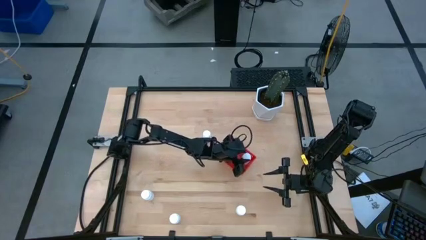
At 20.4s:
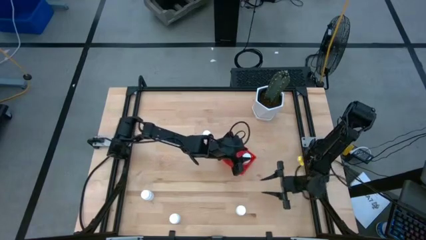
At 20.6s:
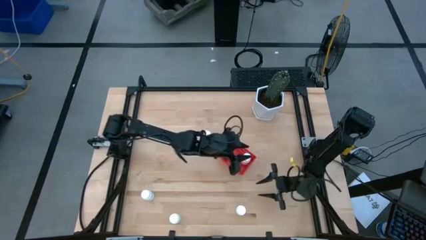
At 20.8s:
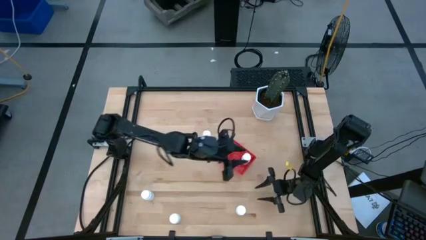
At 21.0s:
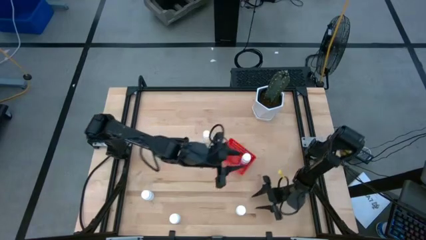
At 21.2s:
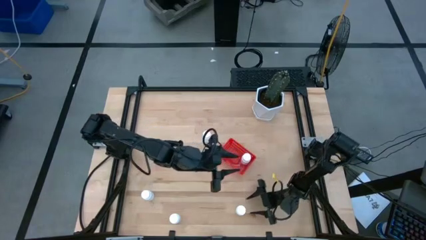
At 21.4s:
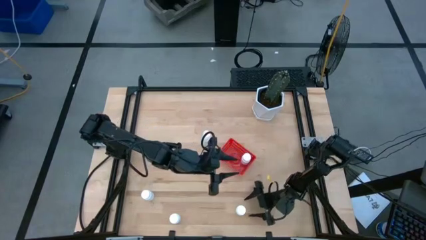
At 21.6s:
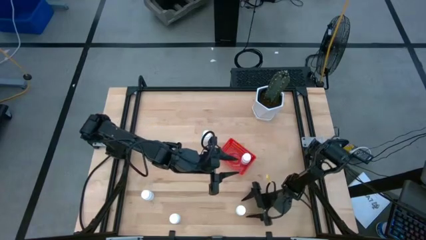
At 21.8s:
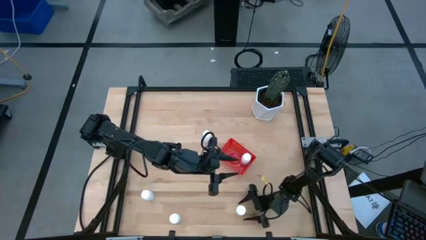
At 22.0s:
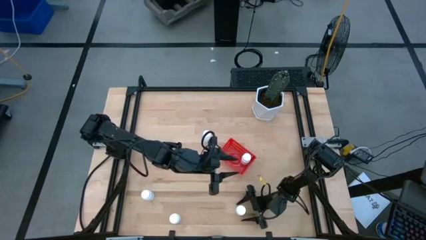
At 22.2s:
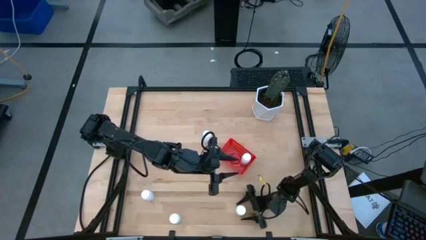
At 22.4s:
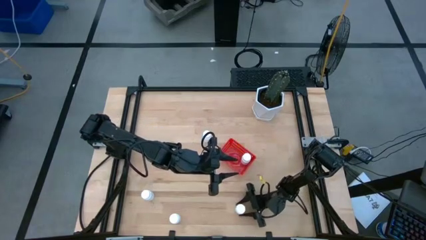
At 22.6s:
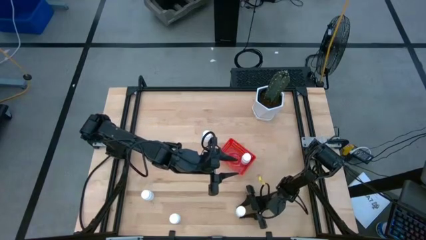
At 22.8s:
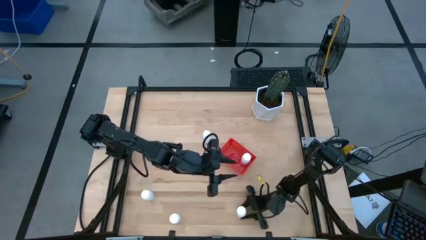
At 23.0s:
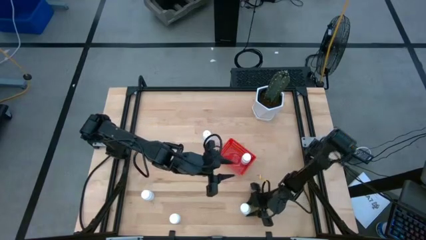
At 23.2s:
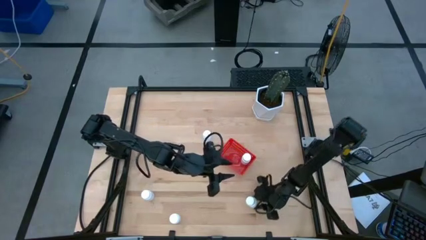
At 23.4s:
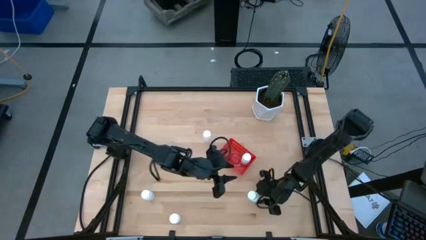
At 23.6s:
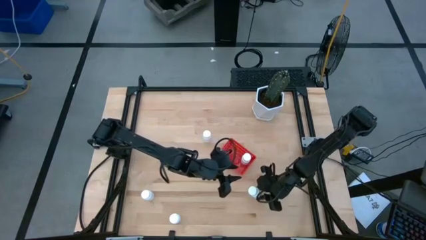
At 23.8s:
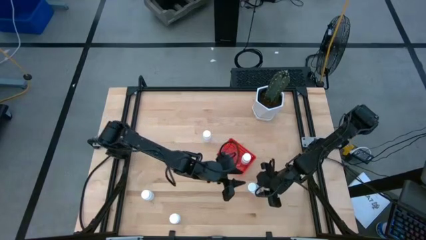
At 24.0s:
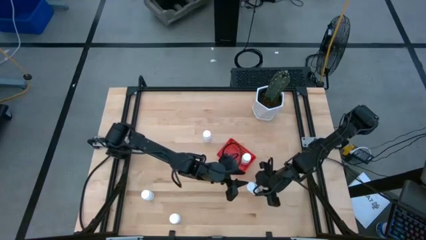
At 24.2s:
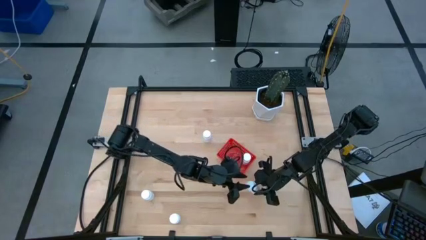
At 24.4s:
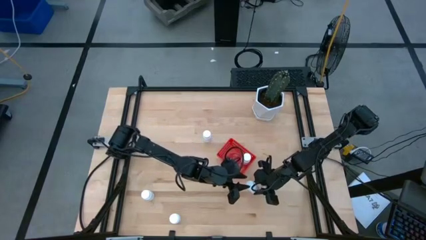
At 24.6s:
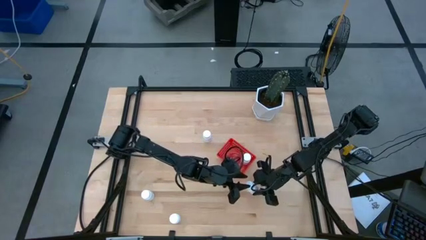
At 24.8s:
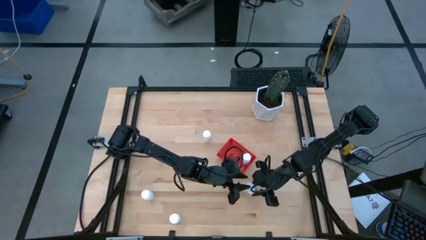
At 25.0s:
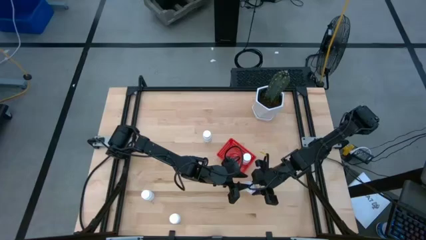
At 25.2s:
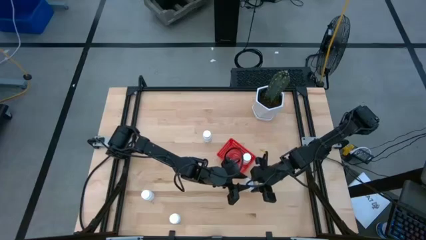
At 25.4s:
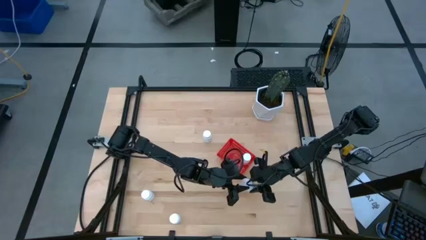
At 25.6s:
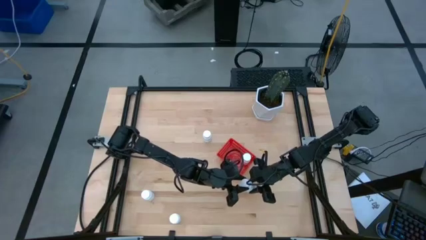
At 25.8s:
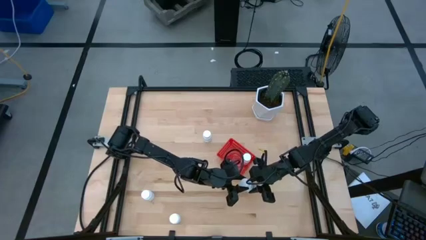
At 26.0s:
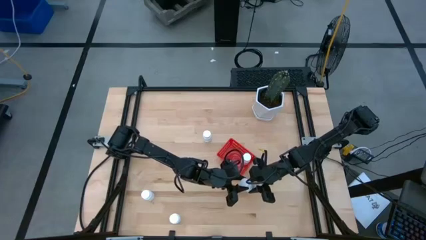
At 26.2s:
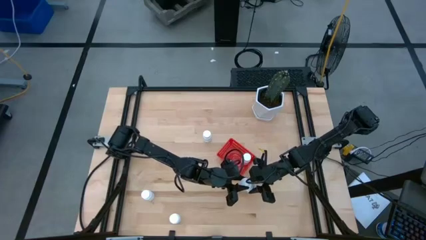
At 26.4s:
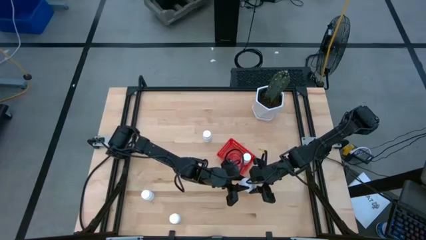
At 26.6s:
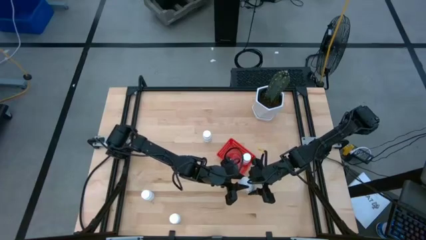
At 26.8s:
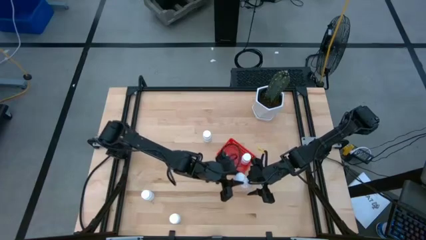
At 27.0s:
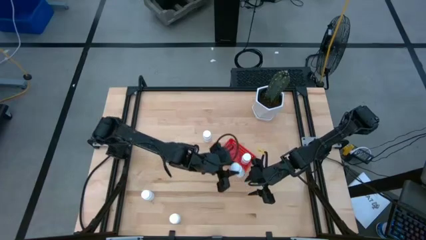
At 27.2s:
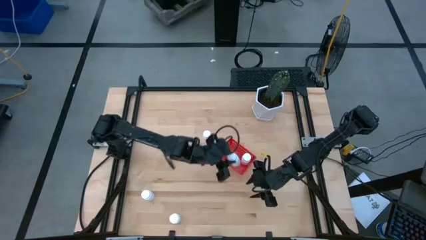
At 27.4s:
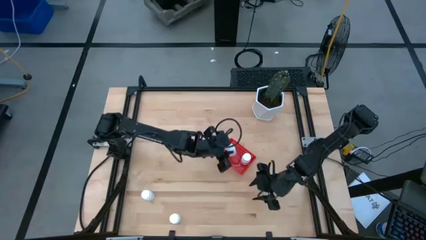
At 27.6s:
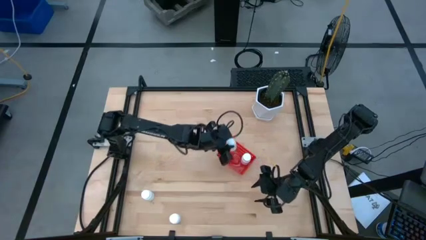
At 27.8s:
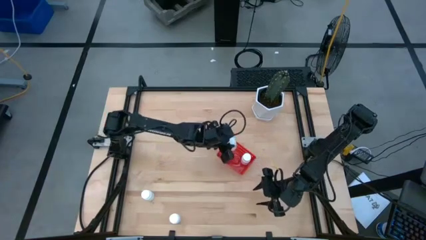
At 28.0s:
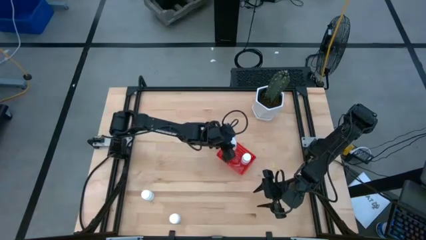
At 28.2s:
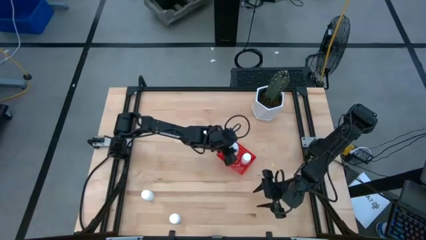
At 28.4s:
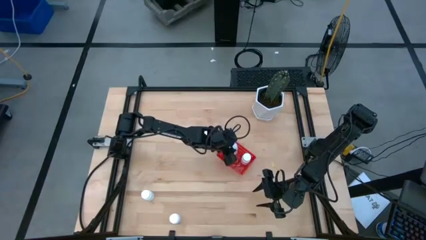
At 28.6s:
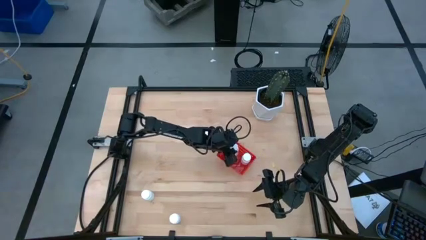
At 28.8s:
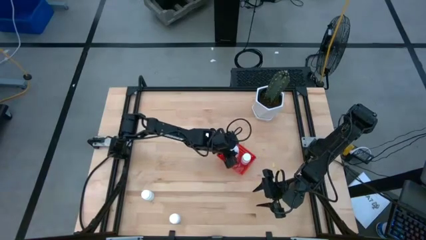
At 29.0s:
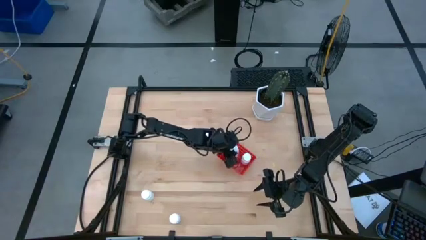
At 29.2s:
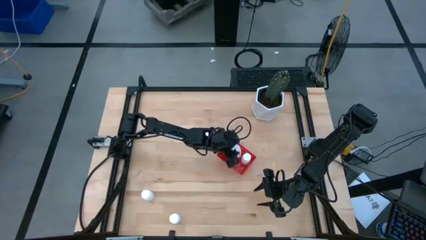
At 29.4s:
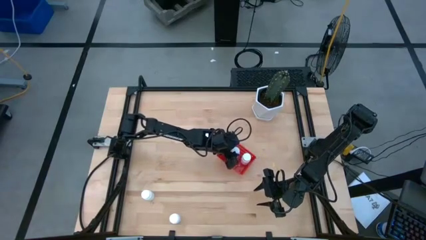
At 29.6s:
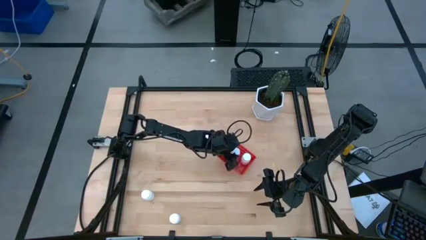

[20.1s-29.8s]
Task: Pick and place pill bottles into a basket
Put the white pill bottle into the red bin

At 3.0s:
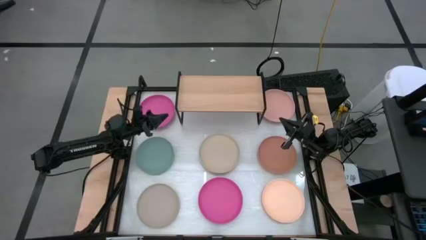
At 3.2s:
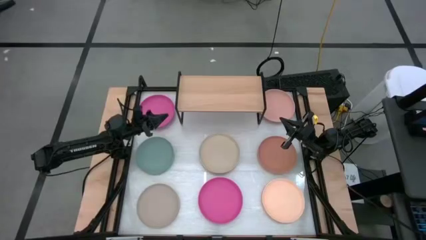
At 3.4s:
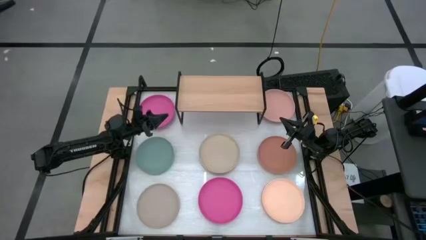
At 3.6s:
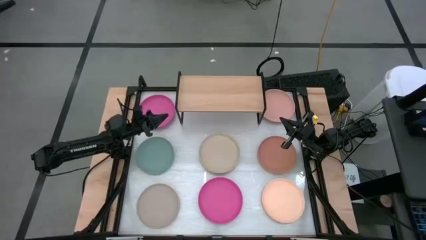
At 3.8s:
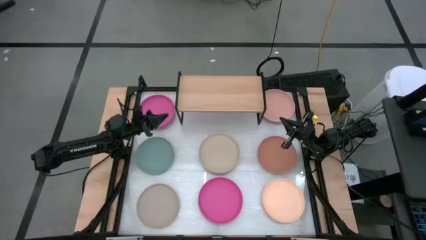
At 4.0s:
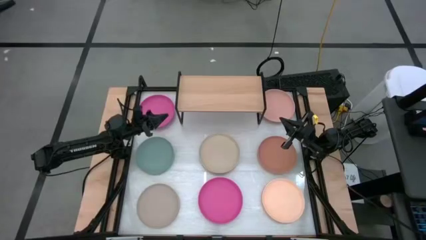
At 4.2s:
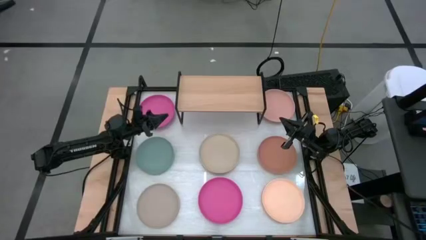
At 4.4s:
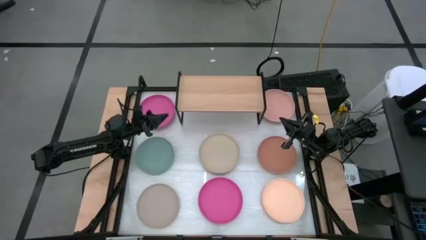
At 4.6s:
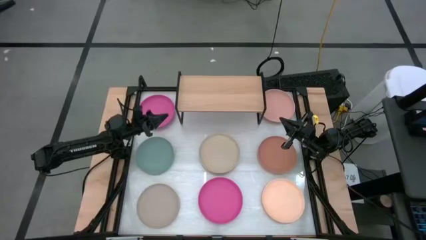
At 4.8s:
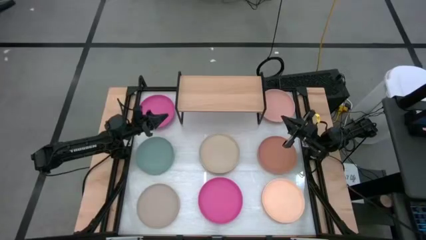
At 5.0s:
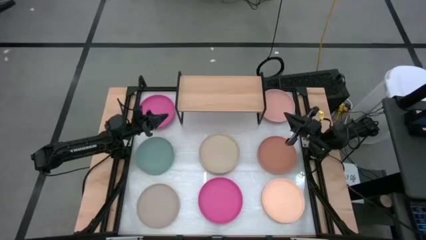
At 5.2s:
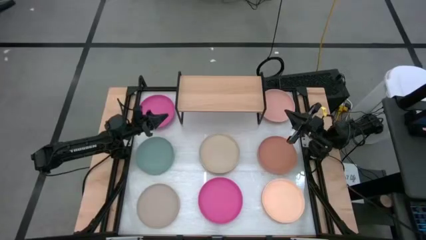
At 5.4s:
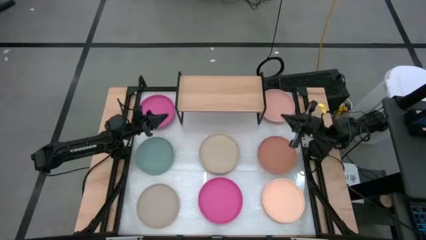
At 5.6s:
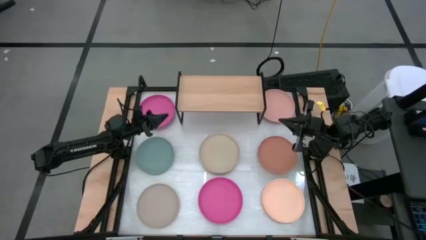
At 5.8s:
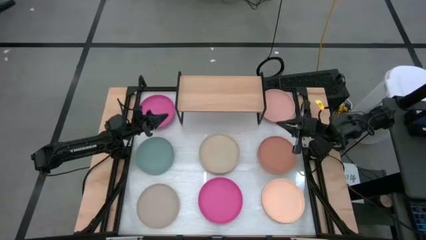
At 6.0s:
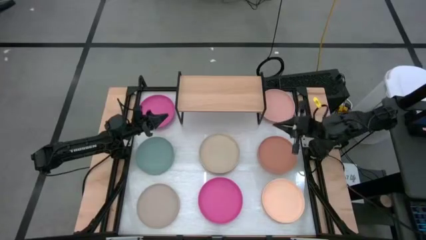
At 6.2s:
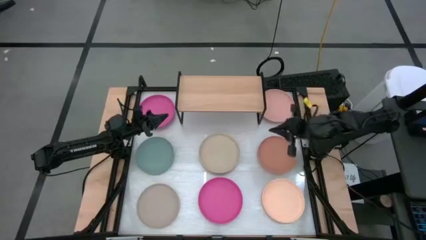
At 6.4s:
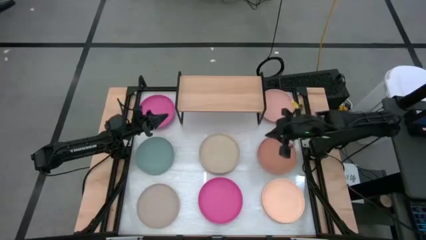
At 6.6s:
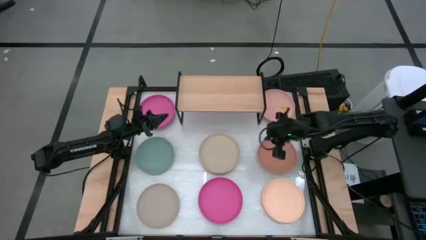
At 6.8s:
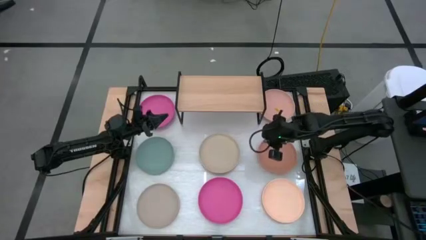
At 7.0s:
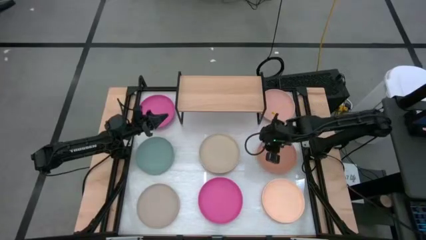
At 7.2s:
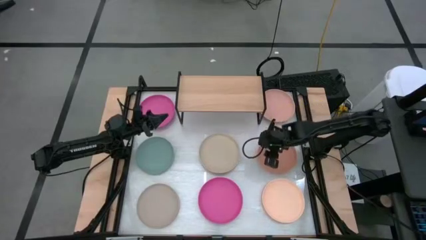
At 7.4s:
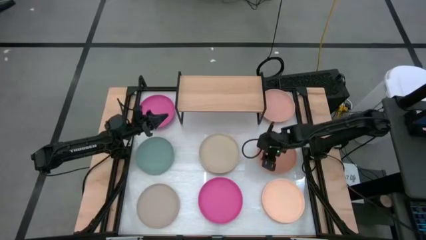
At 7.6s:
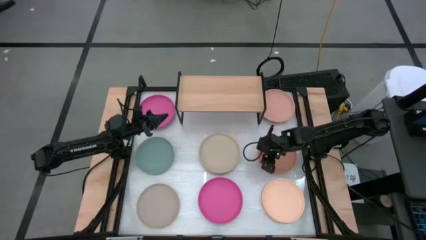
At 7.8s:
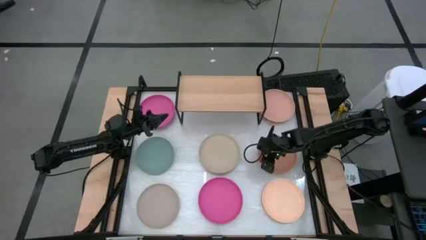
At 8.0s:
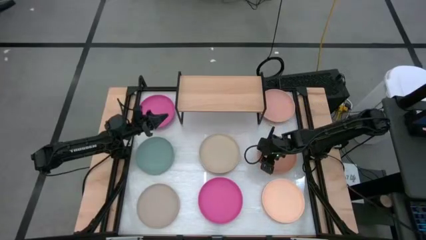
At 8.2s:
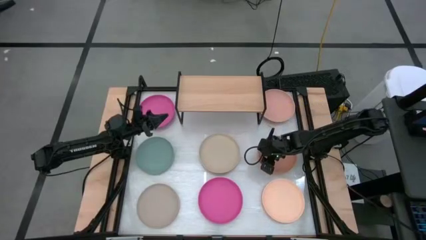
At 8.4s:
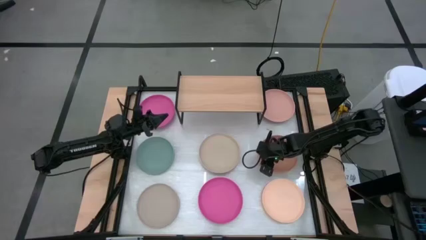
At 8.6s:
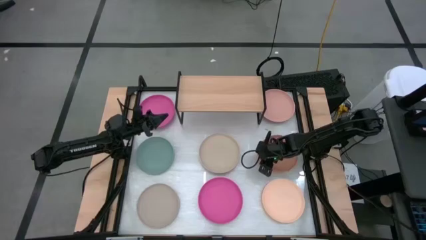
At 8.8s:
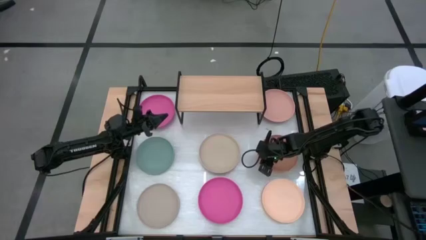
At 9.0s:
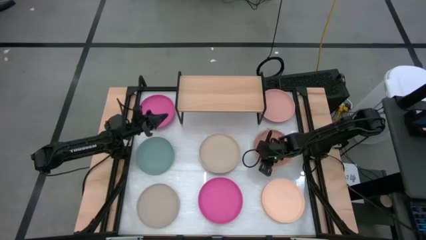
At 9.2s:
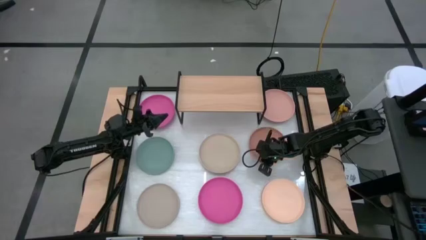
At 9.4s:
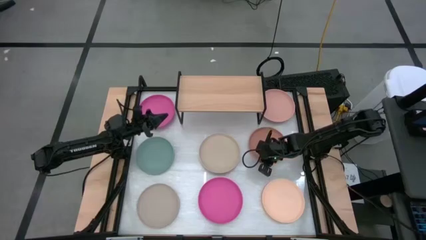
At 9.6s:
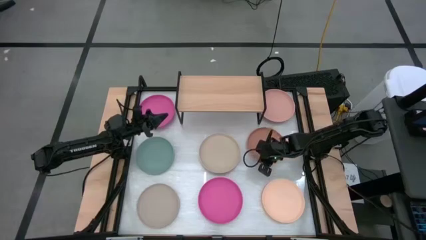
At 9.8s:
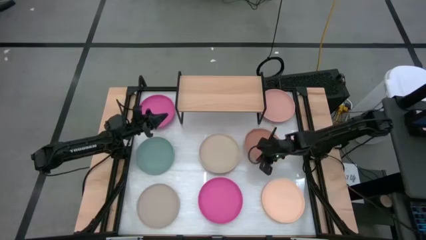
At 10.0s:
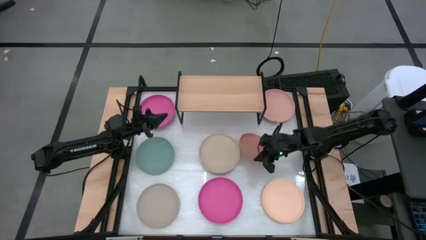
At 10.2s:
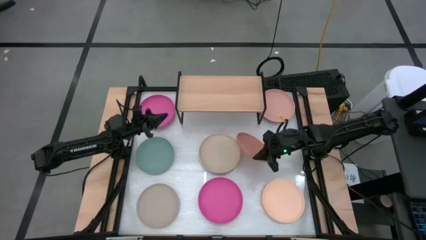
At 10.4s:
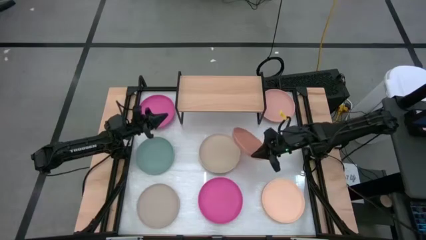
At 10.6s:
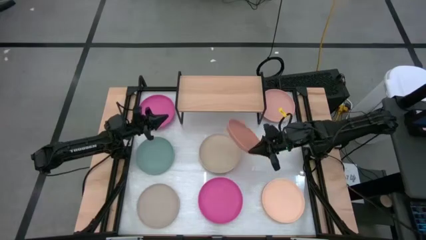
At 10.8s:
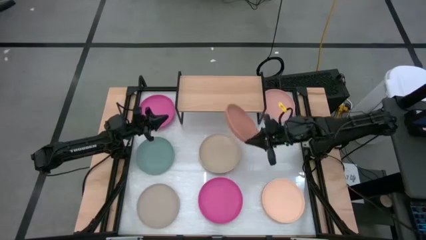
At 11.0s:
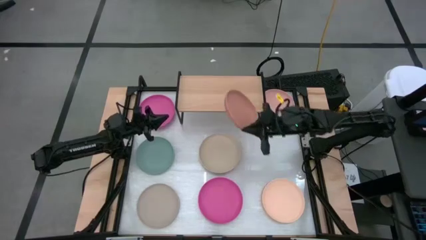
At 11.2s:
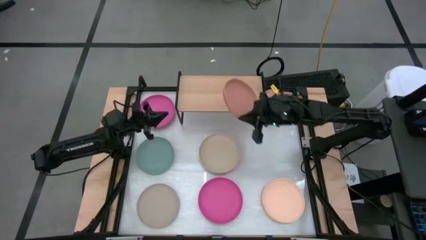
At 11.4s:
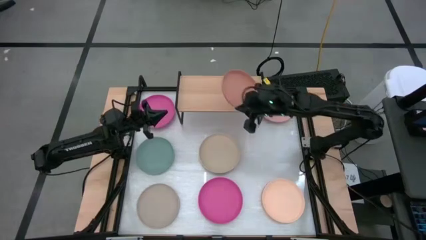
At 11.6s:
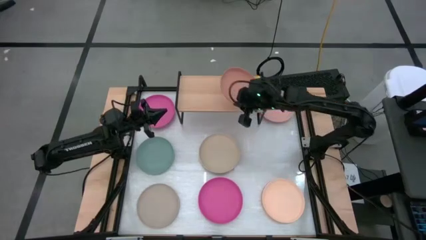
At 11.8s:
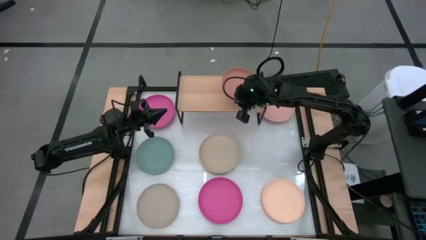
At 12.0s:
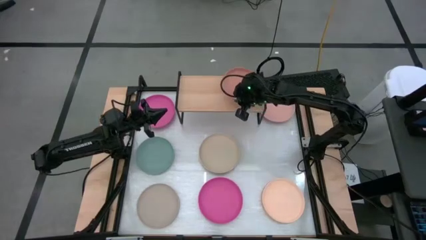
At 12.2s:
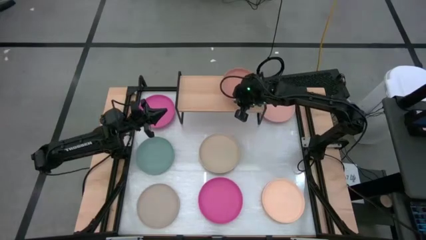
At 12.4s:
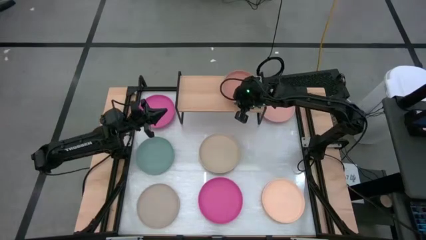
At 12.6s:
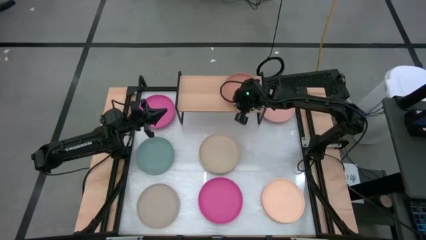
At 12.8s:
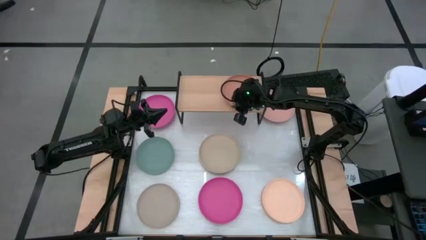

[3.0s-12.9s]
Task: Place and stack plates onto a shelf
Put the brown plate on the shelf
